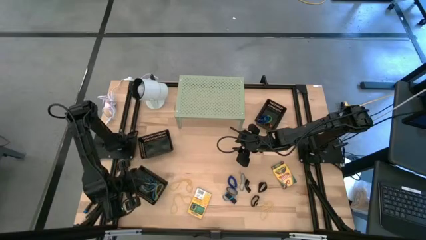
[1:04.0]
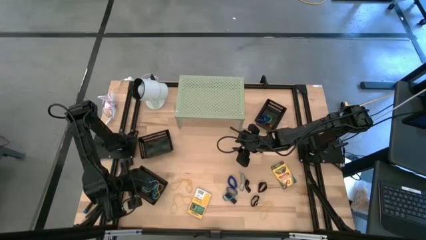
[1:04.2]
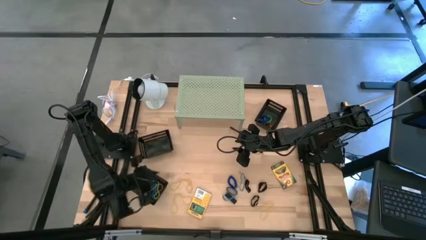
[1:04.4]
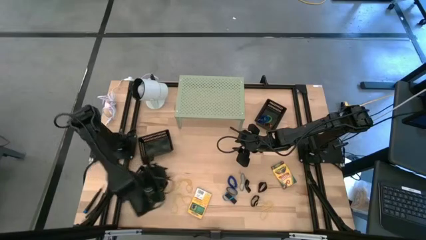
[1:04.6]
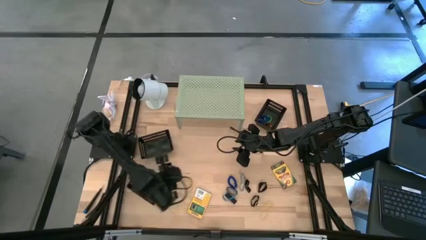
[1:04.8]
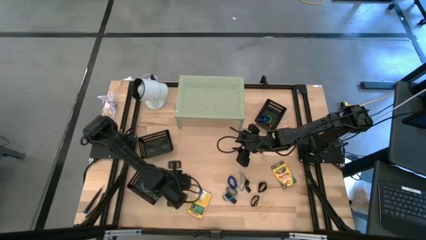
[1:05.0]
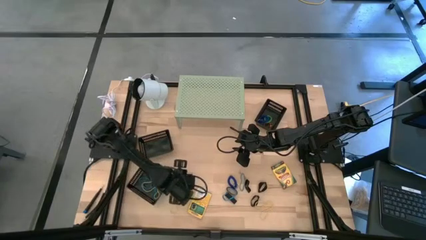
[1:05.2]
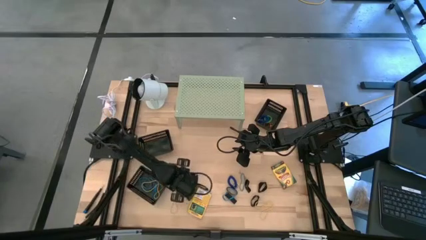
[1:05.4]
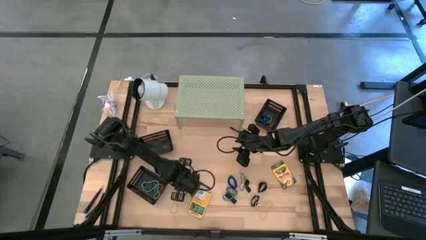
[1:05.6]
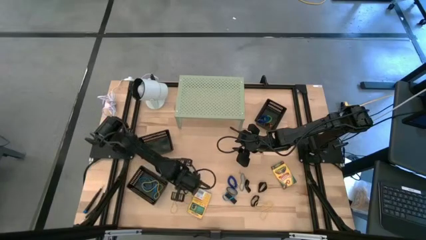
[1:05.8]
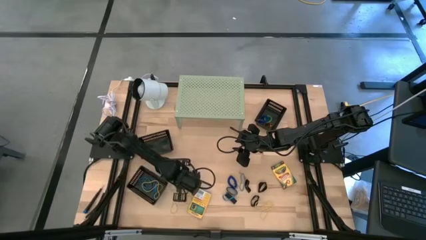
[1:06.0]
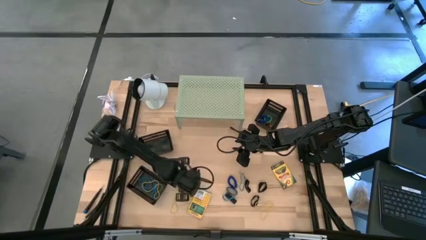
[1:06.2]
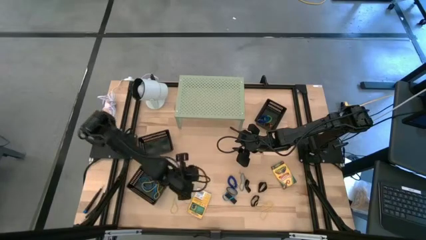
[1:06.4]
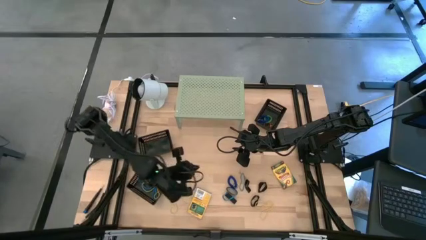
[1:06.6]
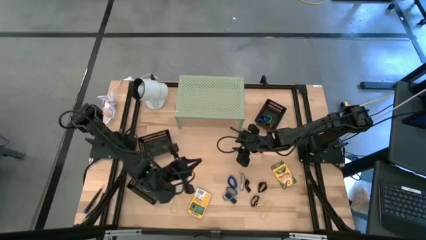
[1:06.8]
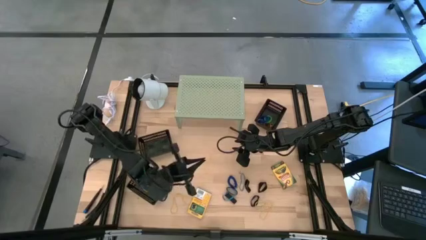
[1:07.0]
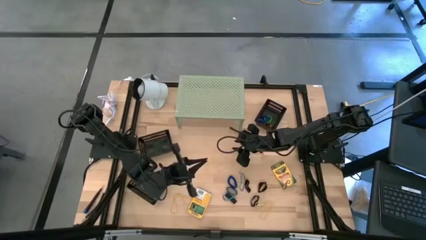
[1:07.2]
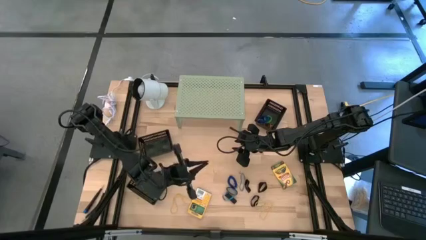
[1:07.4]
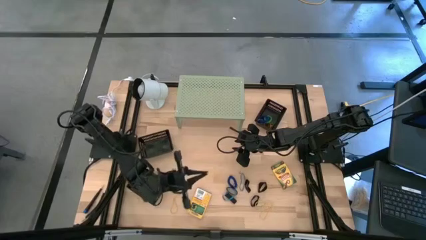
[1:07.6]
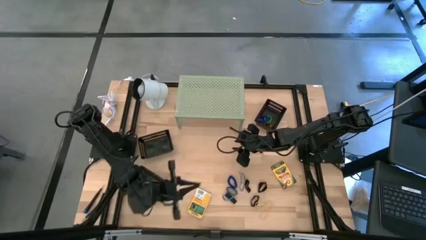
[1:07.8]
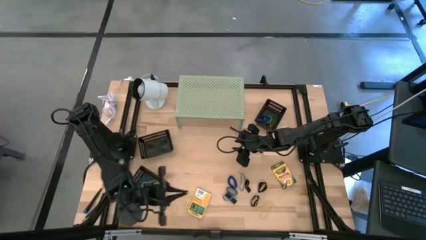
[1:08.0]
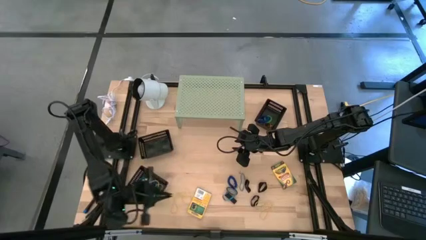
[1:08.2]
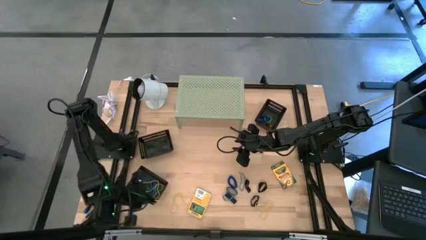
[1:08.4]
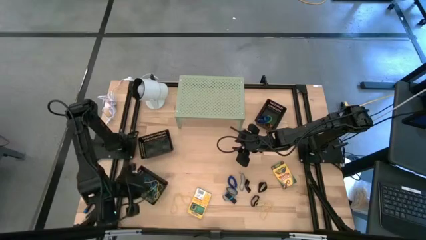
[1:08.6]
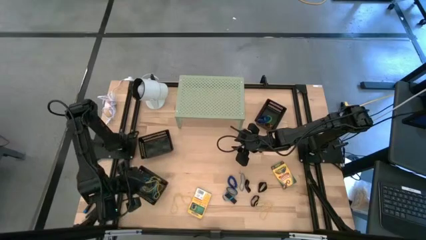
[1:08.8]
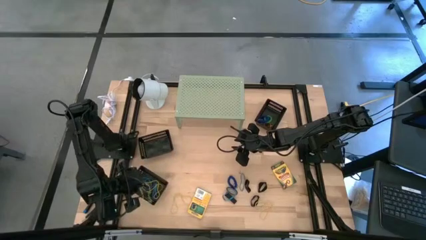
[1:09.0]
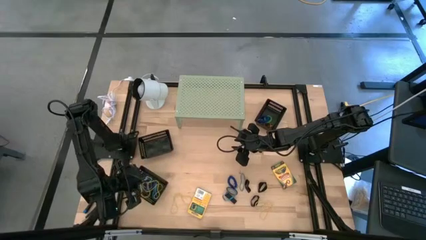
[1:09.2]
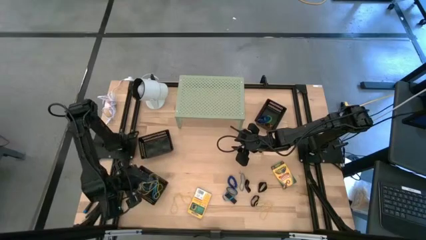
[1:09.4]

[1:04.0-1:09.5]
Task: Pick & Place Office Desk Supplies
Put the yellow rubber band into the bottom left black bin

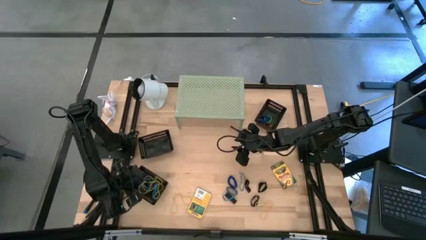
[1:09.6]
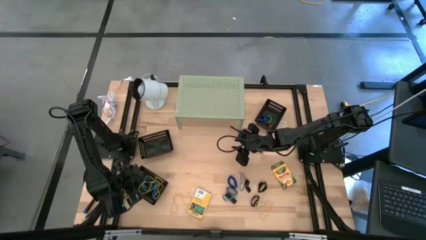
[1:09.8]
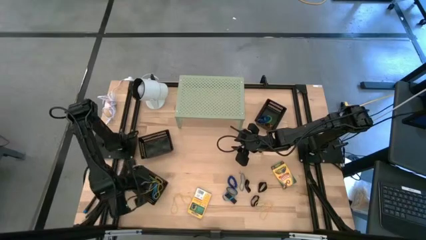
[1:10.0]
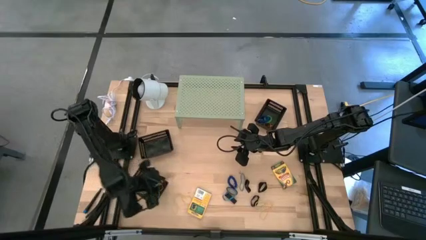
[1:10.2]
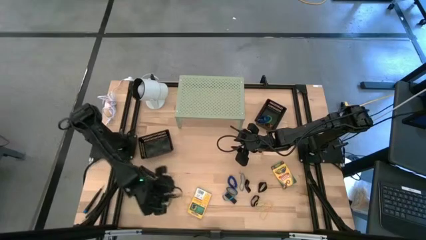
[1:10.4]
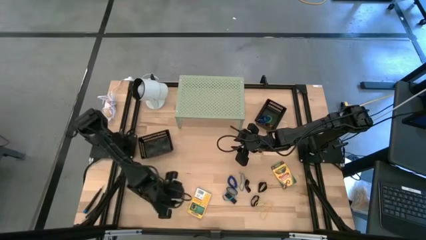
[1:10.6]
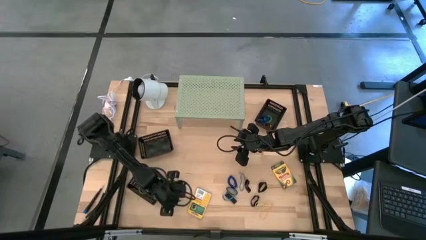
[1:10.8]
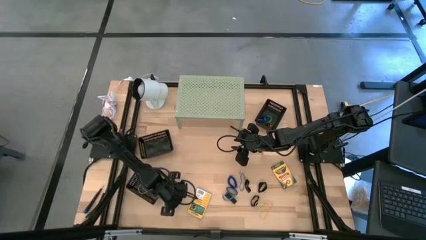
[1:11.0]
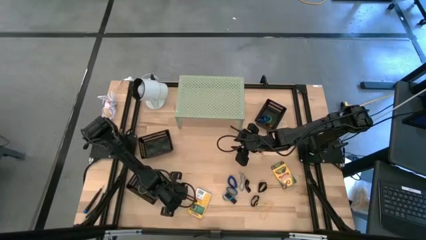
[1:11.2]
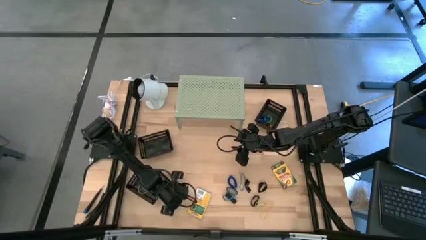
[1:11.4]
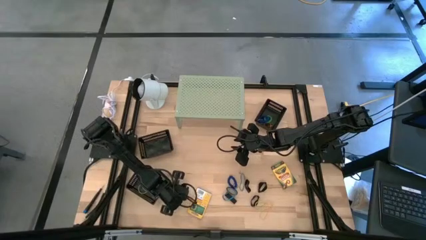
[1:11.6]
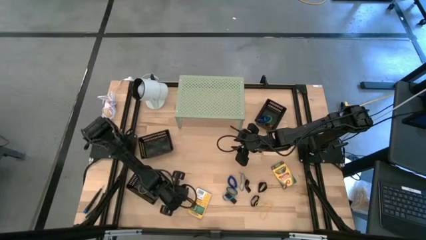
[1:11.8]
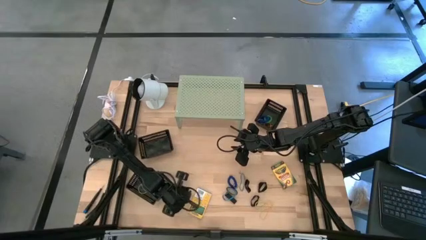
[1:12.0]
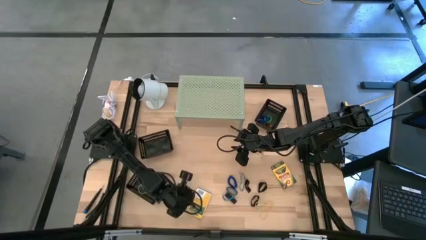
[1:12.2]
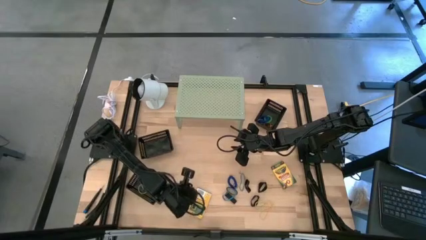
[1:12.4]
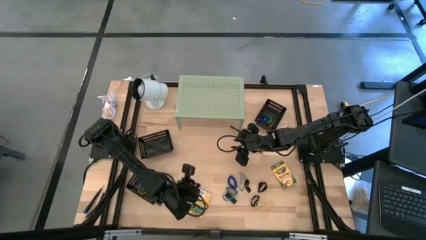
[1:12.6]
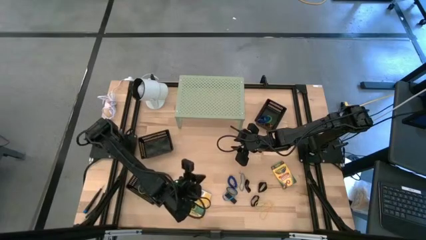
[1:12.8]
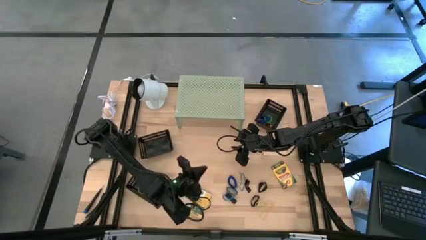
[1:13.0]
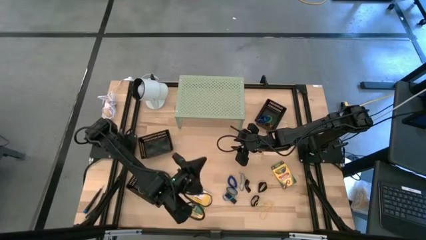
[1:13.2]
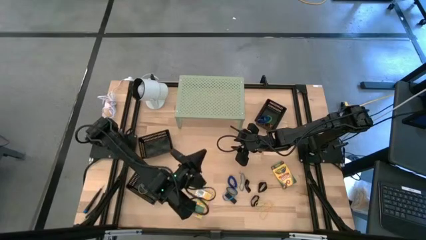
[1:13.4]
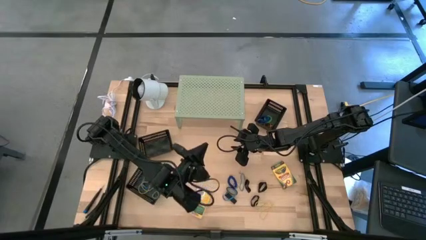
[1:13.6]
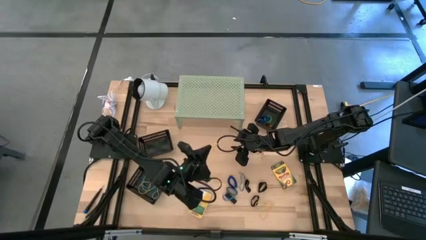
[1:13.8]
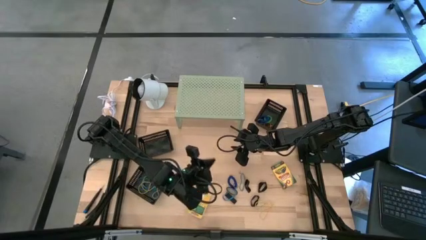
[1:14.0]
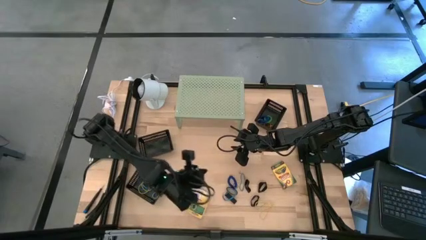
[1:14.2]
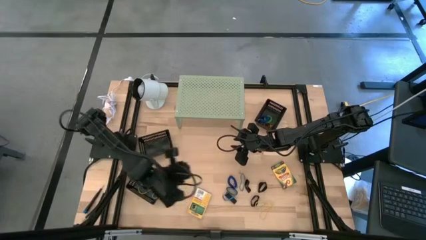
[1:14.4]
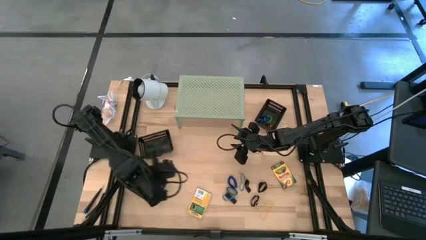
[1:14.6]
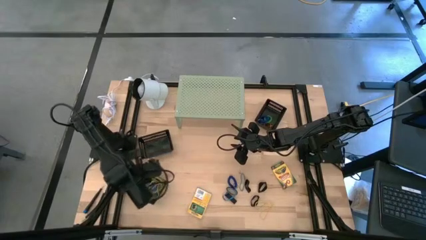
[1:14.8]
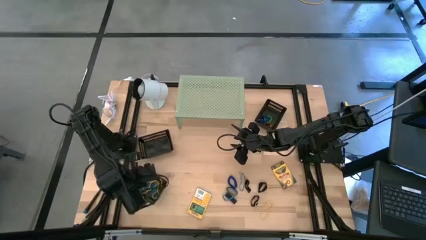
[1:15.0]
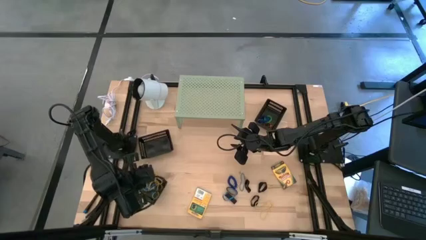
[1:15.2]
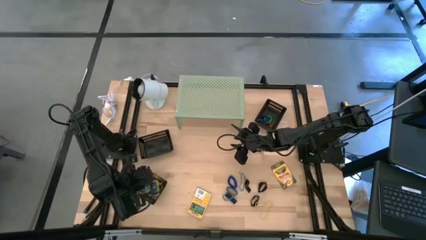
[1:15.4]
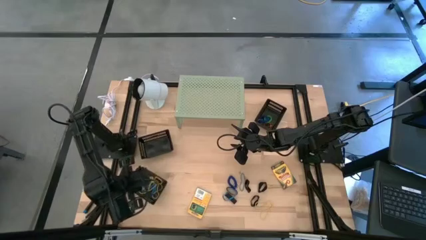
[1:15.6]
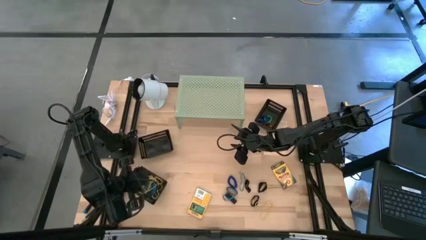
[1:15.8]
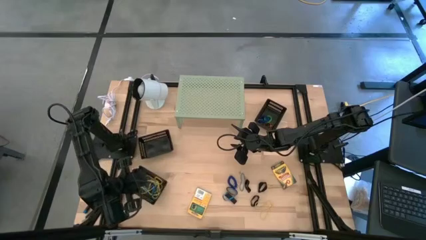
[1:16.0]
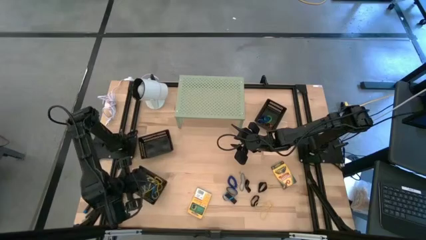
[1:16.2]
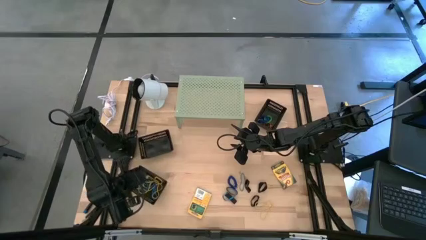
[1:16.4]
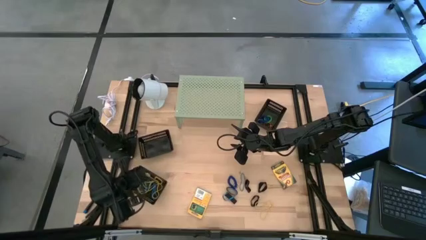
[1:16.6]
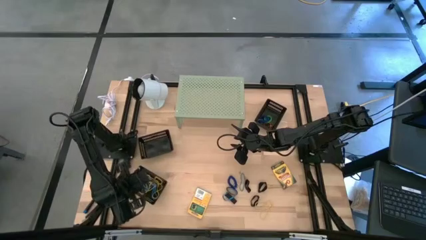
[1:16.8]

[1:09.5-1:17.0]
Put the yellow rubber band into the bottom left black bin

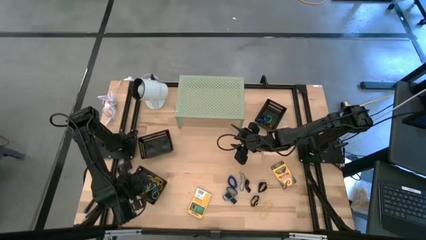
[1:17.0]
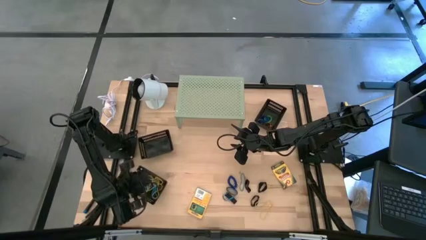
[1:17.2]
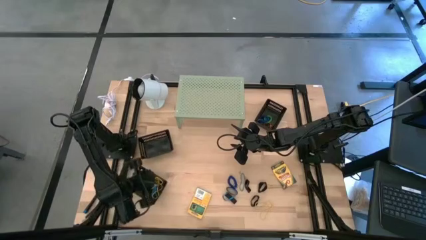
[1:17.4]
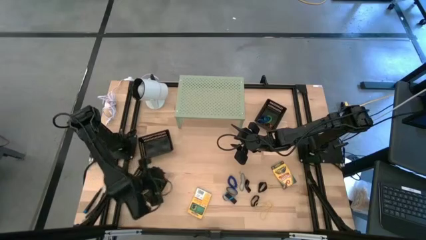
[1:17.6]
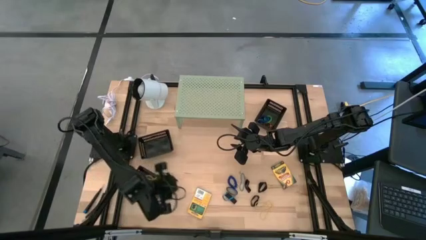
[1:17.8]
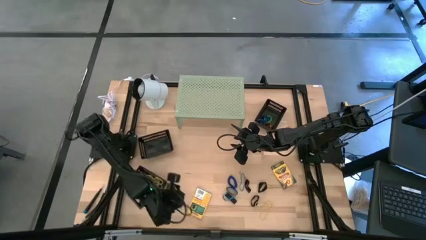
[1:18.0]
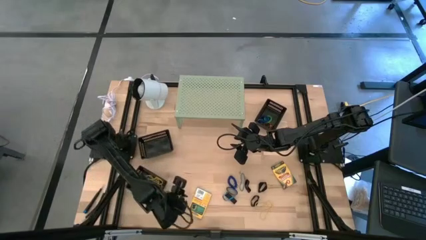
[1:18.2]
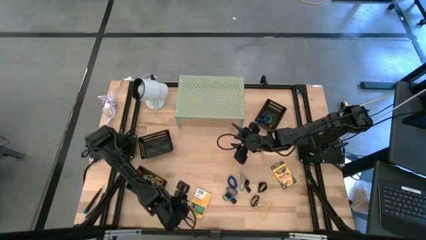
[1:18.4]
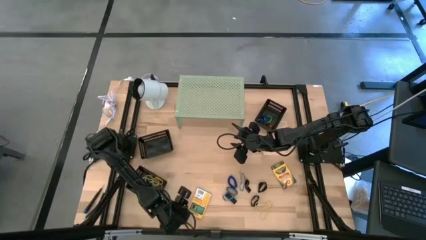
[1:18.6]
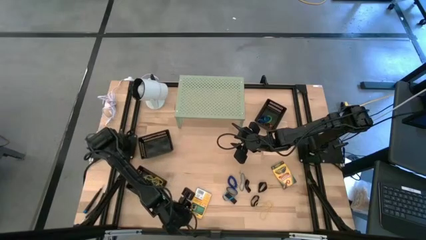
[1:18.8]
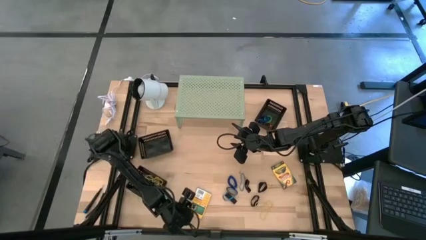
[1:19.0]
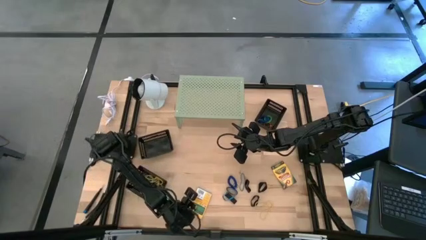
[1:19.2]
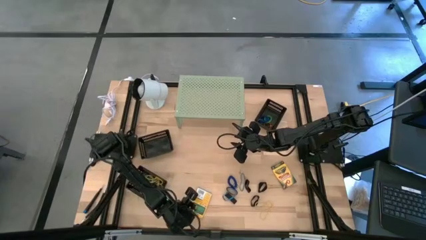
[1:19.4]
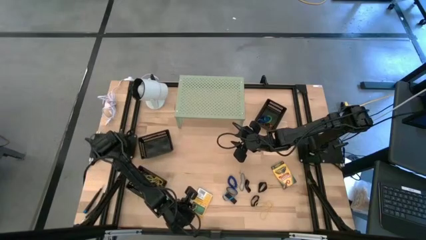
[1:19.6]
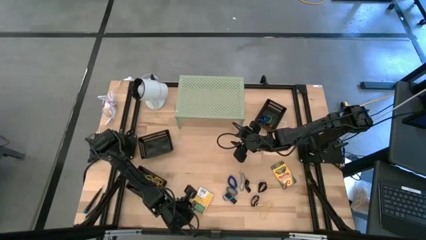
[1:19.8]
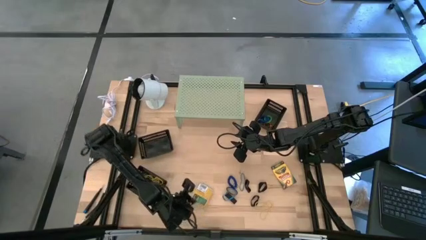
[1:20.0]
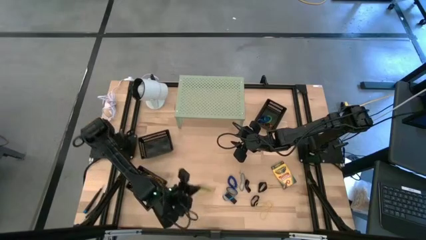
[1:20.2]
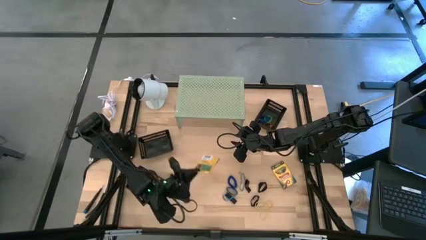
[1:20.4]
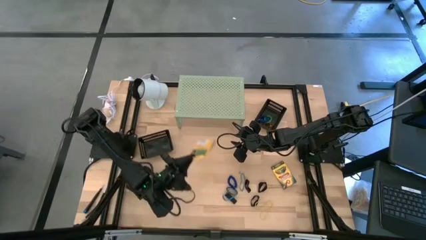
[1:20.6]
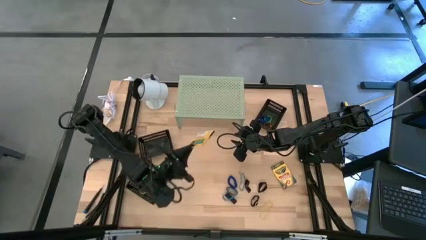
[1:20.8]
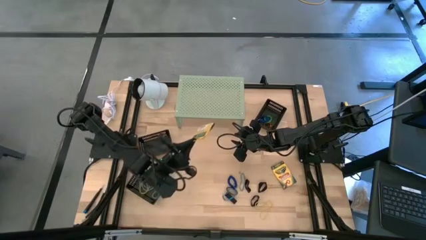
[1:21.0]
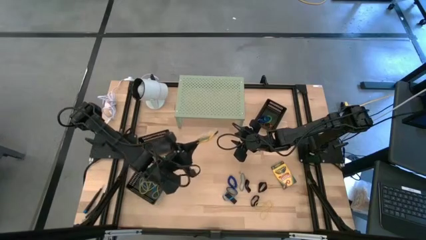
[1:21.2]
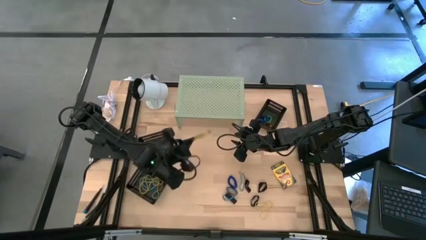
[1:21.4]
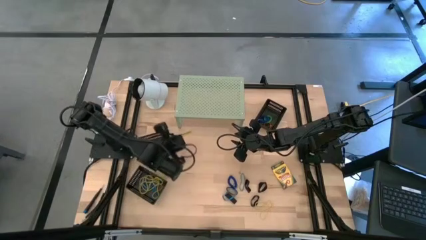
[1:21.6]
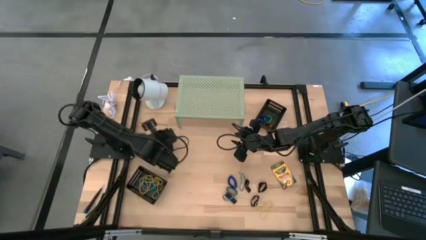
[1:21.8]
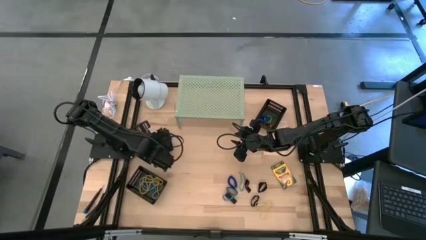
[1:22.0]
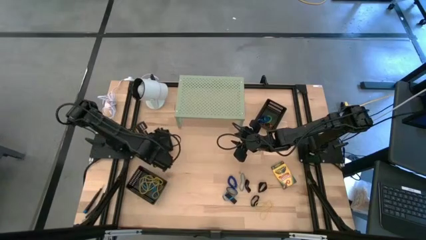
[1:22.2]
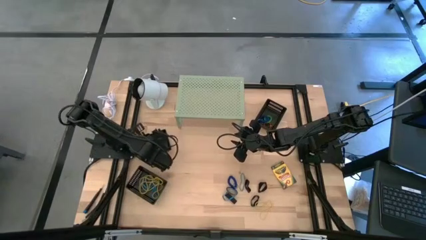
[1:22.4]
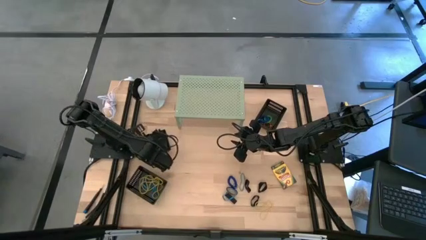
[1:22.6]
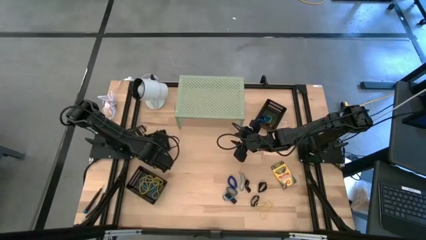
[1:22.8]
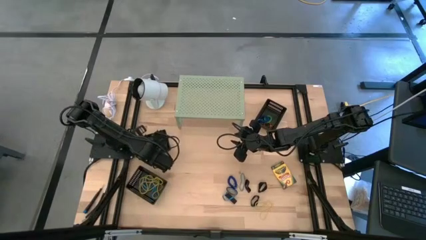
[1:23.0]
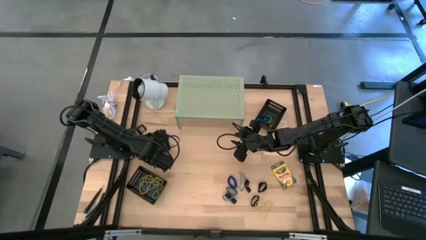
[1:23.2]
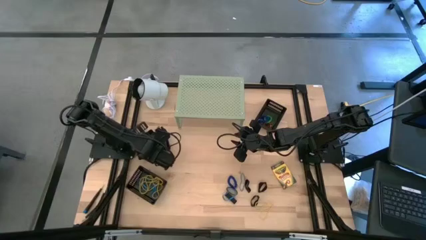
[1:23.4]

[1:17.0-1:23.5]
Put the yellow crayon box into the middle left black bin
